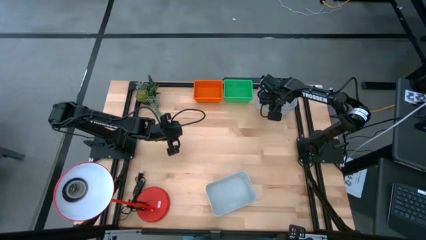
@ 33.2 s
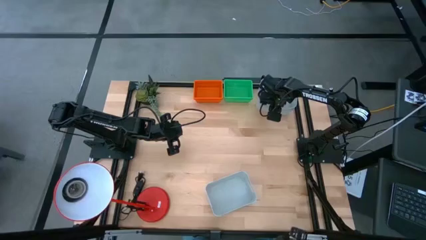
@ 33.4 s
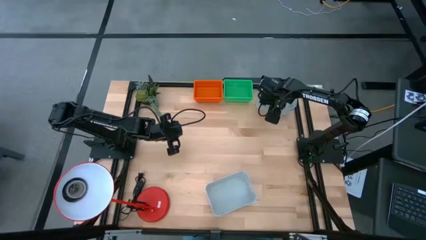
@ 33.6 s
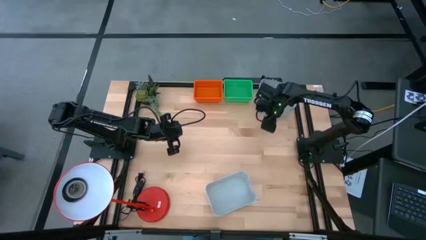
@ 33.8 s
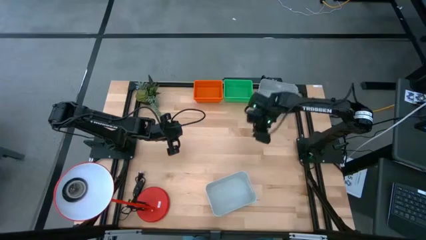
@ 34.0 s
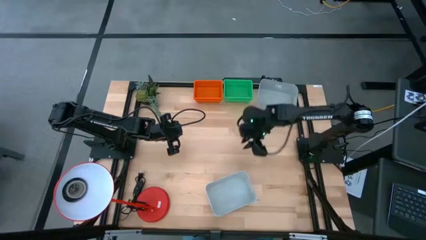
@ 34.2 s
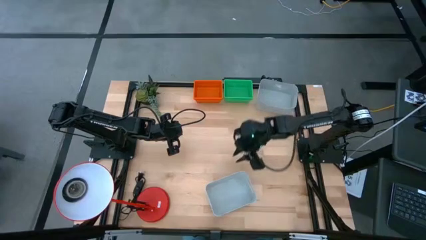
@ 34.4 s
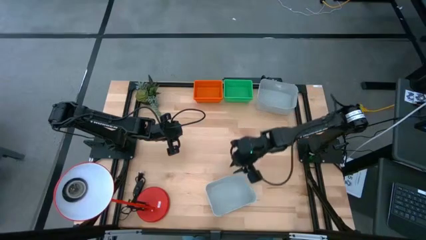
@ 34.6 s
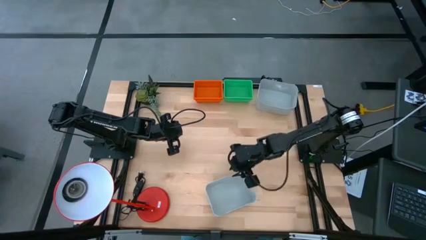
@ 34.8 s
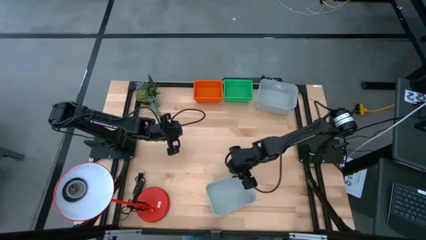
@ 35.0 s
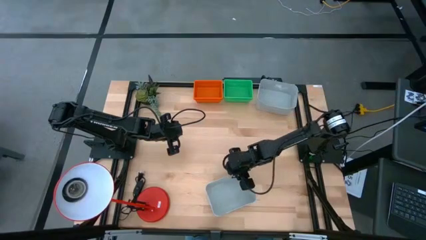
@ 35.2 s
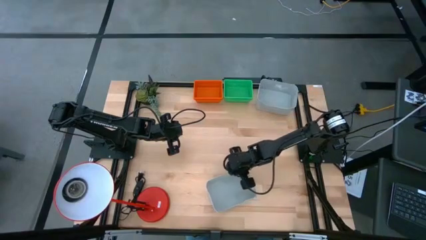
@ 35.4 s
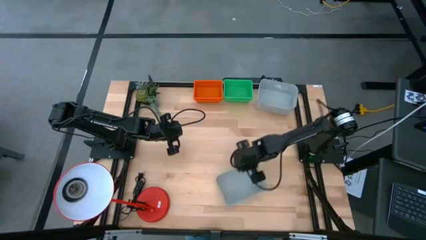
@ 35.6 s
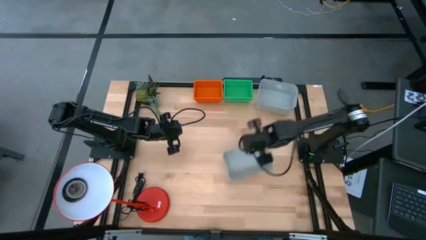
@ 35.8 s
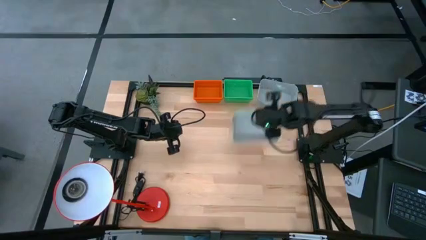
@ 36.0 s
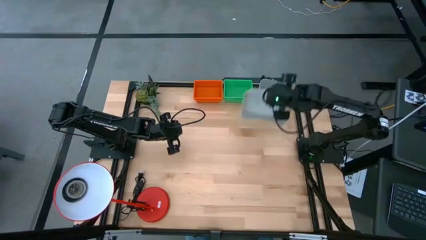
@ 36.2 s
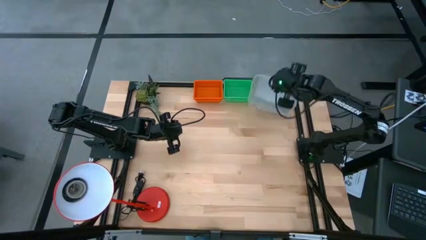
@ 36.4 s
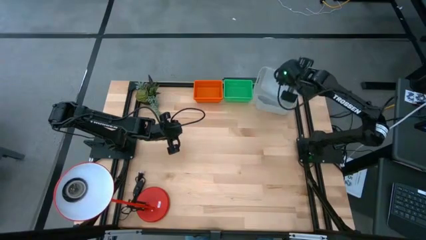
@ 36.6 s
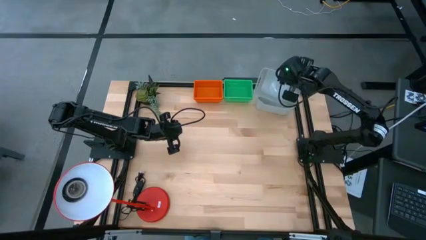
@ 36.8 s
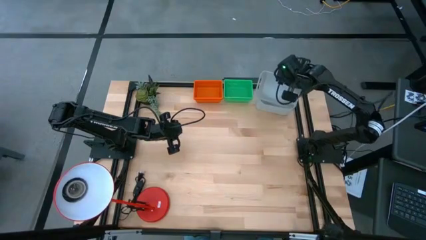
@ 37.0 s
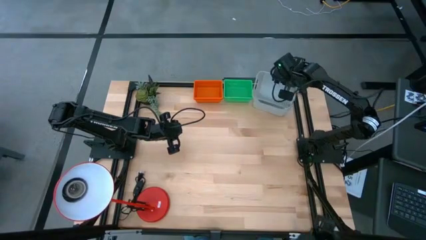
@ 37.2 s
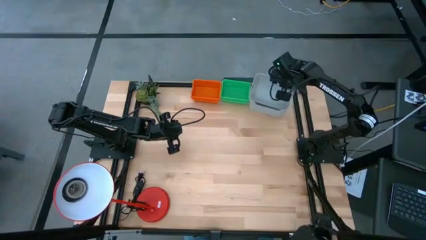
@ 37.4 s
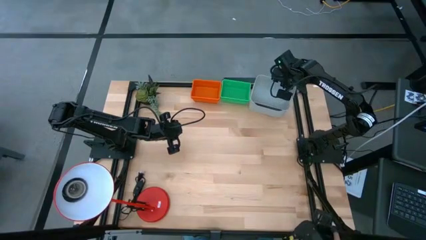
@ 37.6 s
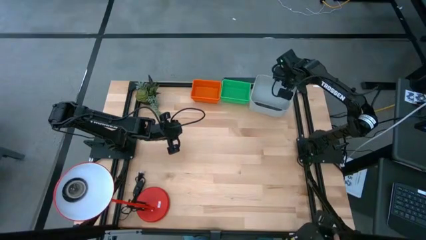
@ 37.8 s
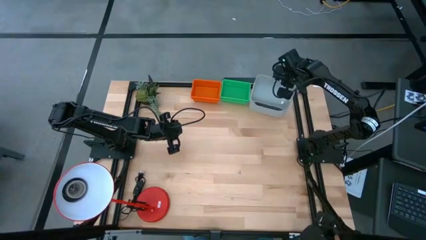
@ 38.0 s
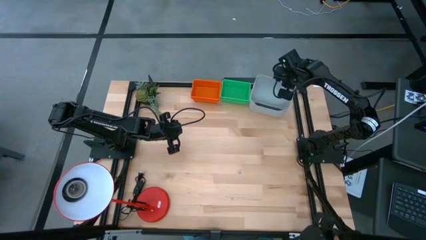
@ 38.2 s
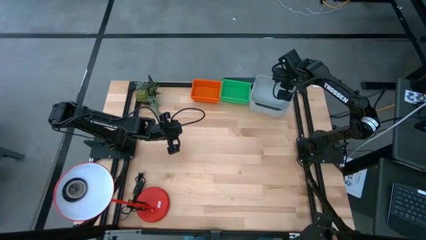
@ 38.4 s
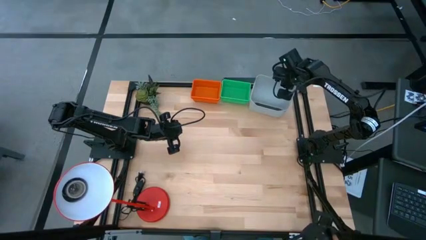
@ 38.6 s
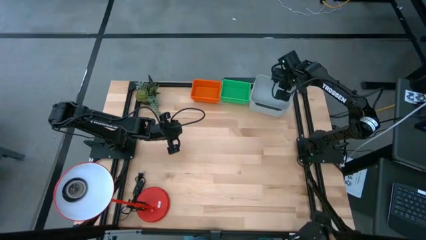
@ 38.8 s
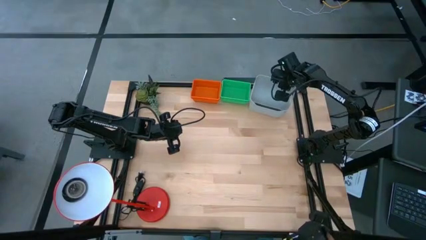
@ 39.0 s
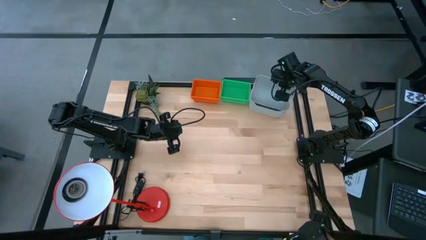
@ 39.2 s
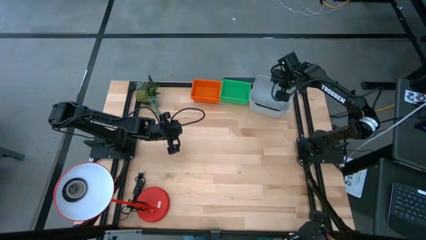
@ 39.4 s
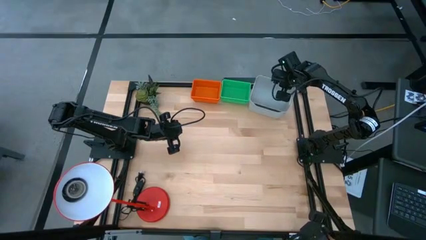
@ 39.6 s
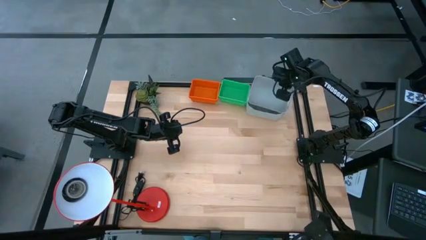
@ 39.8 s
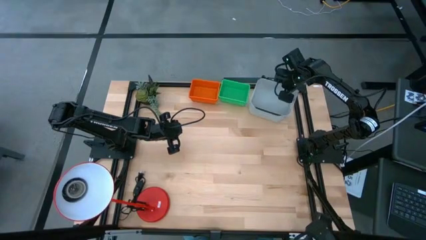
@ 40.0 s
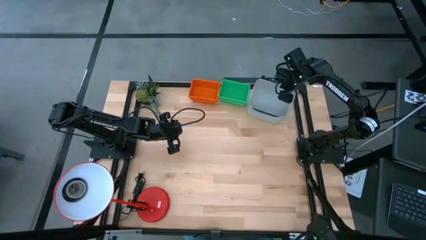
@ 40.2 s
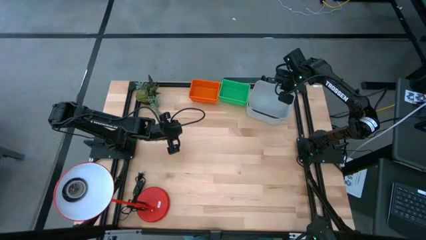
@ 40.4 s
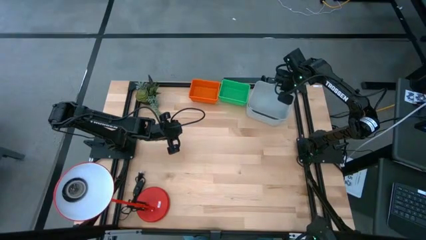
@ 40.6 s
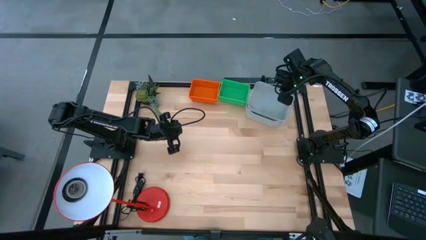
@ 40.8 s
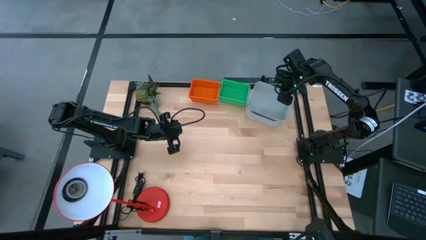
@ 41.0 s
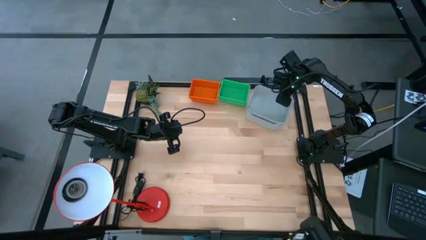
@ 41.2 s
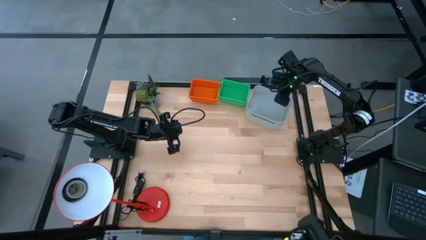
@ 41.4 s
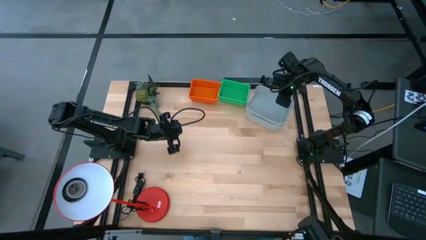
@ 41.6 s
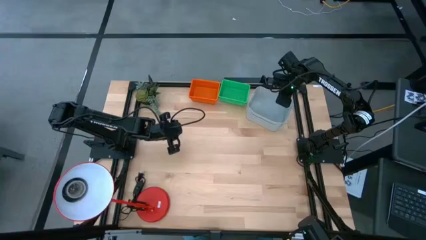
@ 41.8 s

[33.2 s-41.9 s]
Stack the bottom gray bin on the top gray bins

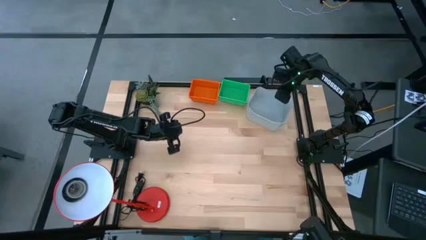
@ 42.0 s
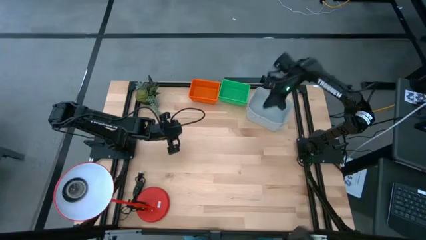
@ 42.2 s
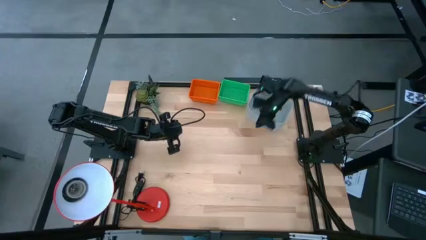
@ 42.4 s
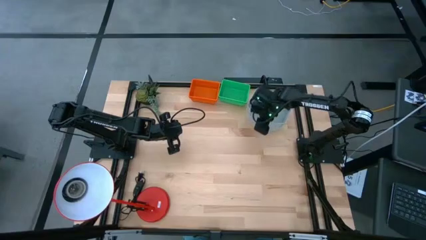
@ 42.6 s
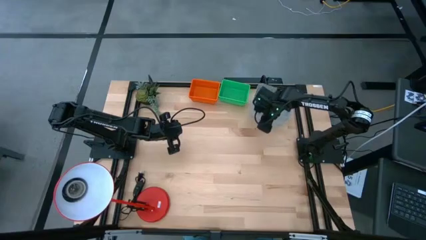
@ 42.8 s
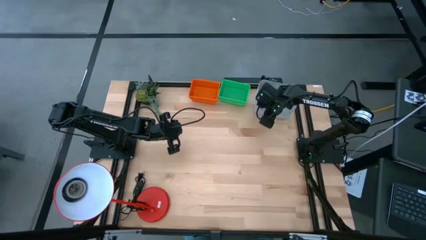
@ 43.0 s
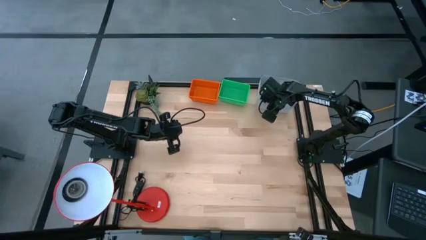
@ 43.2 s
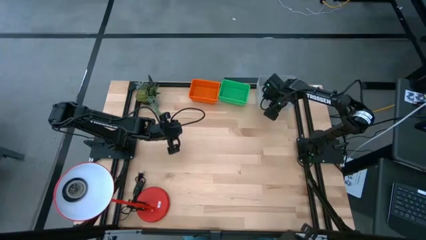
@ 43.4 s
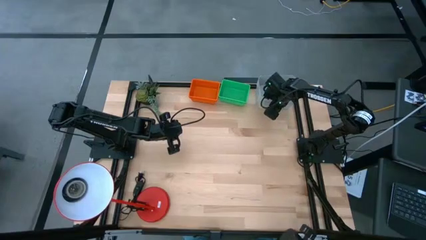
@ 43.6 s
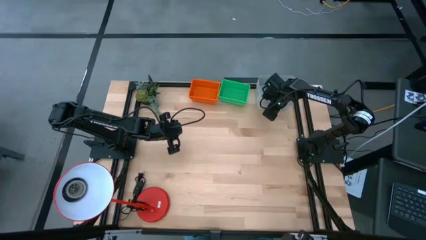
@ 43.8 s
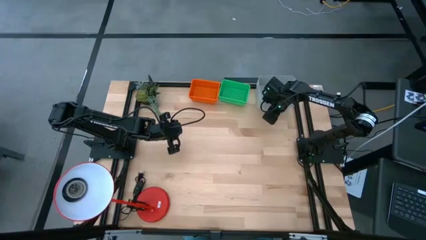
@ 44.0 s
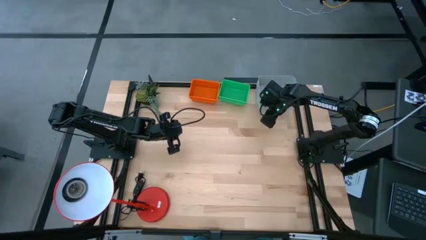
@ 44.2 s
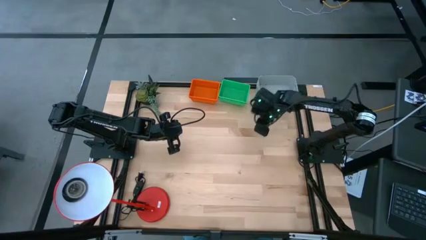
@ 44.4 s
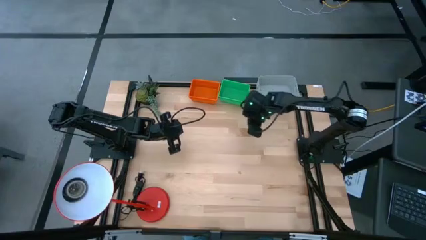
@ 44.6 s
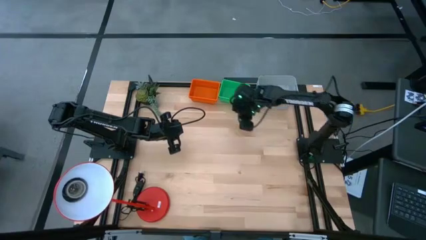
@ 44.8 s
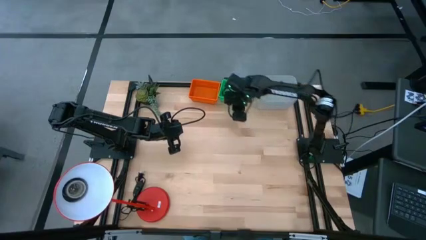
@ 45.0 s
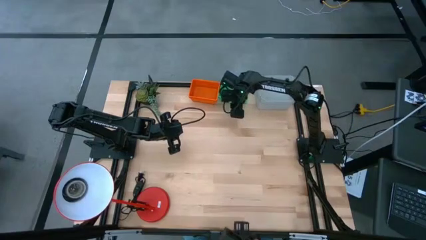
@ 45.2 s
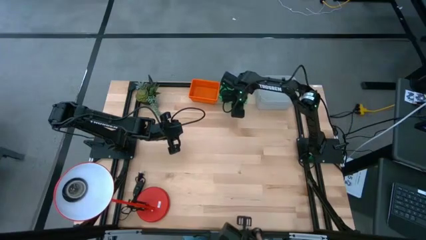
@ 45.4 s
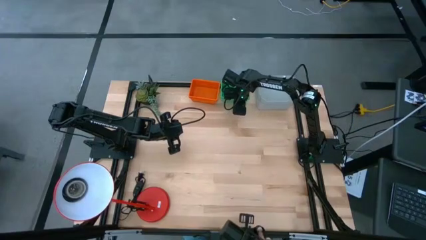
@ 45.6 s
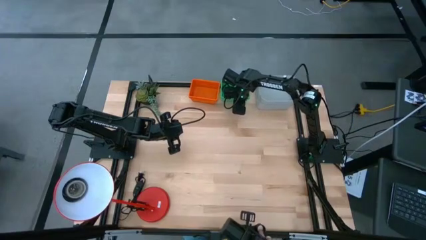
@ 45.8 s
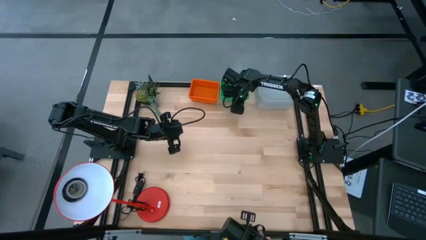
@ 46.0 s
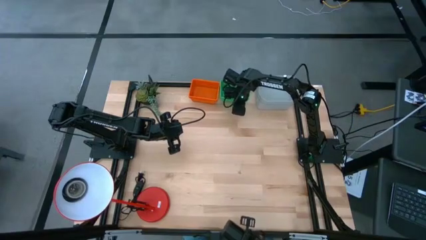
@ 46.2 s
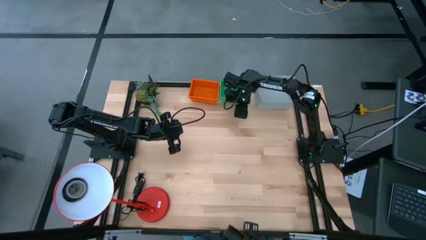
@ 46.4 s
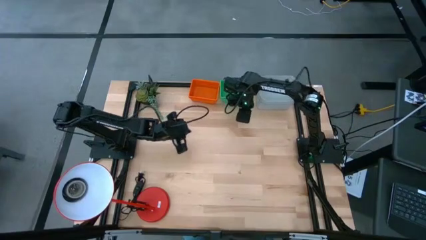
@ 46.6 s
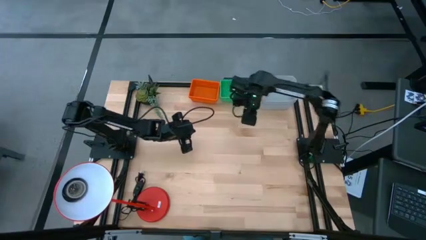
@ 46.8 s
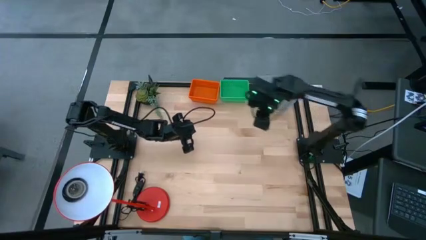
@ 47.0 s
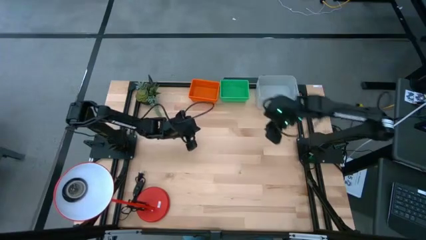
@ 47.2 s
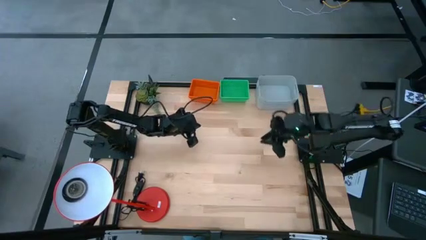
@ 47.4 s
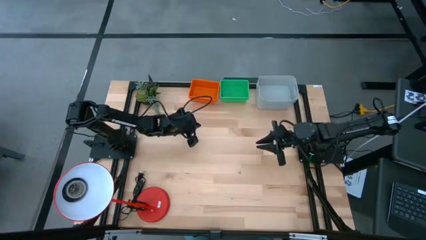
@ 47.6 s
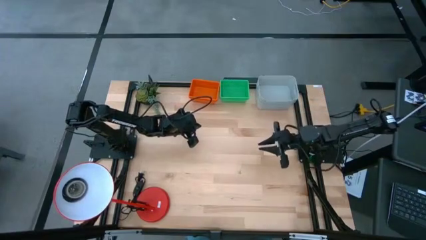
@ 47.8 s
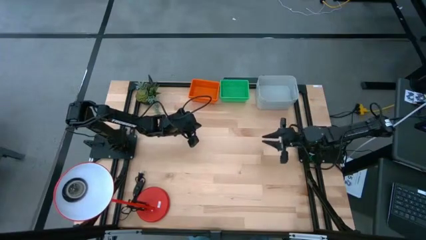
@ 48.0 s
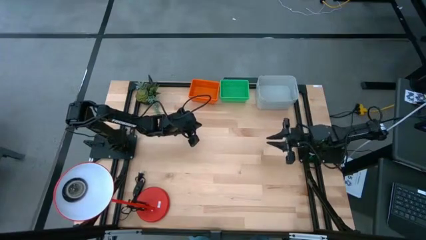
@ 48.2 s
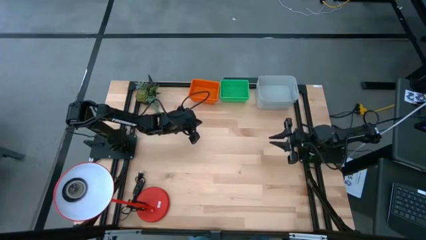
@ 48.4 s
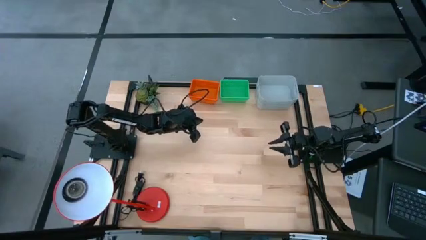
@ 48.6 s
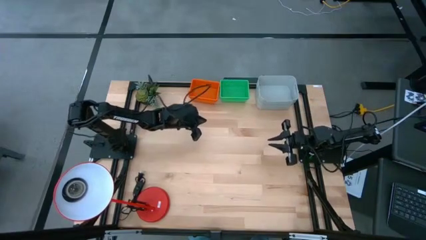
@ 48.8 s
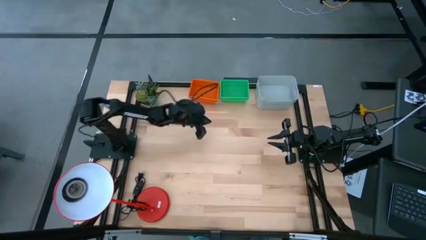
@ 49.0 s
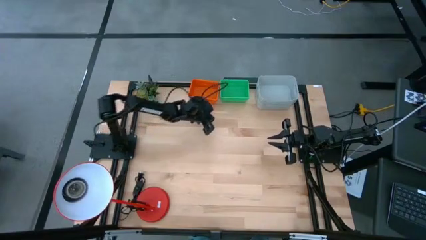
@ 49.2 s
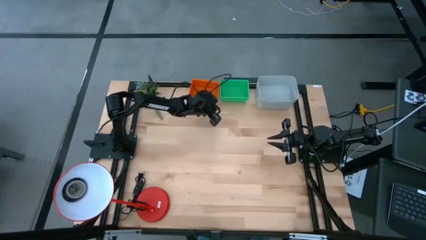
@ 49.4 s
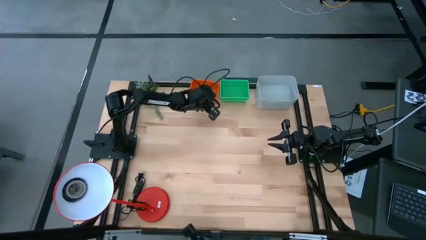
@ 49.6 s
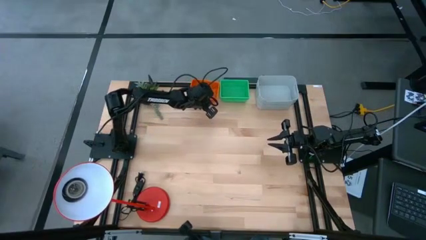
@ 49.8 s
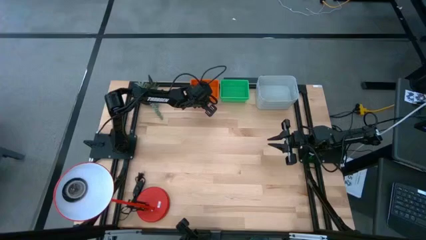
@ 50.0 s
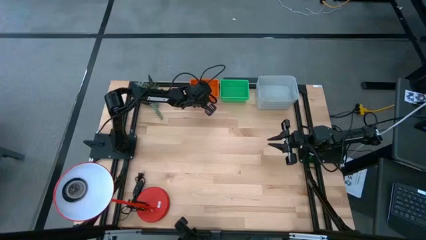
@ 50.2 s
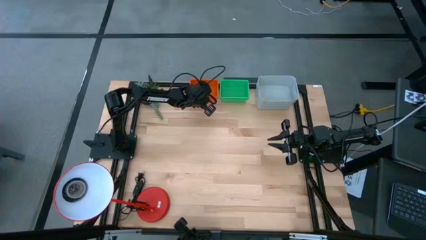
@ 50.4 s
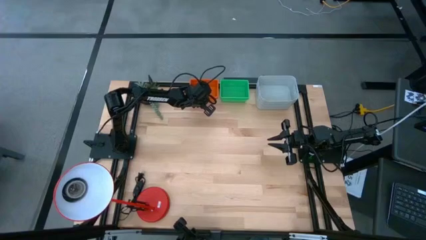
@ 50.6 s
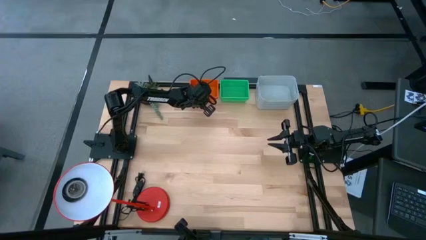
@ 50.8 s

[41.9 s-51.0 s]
Adjust the stacked bins
